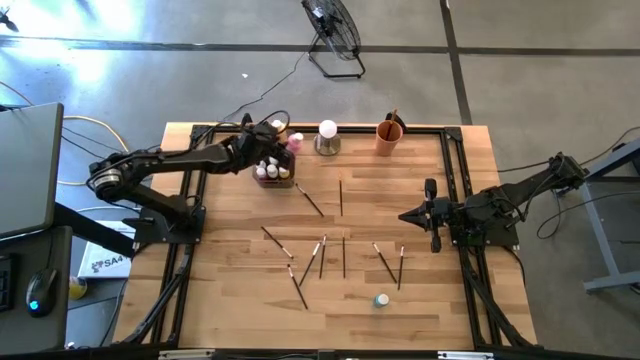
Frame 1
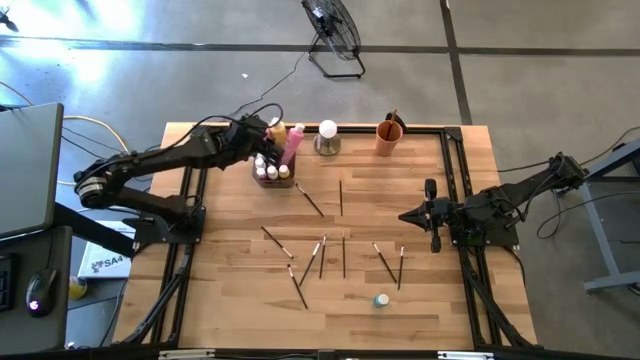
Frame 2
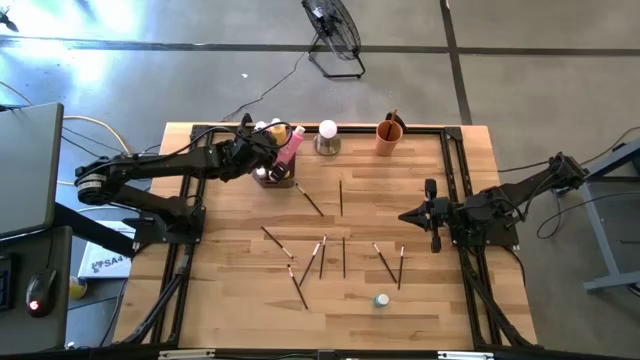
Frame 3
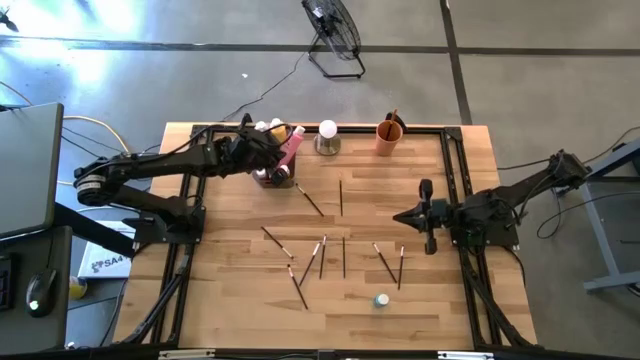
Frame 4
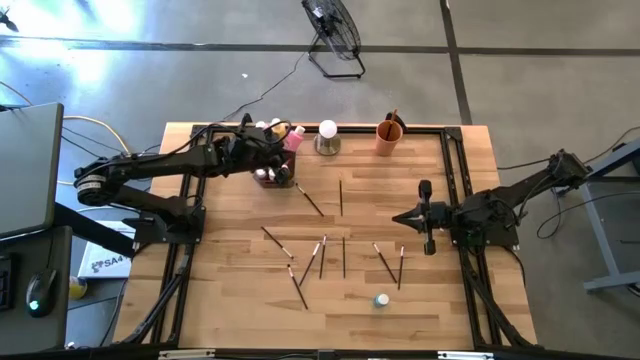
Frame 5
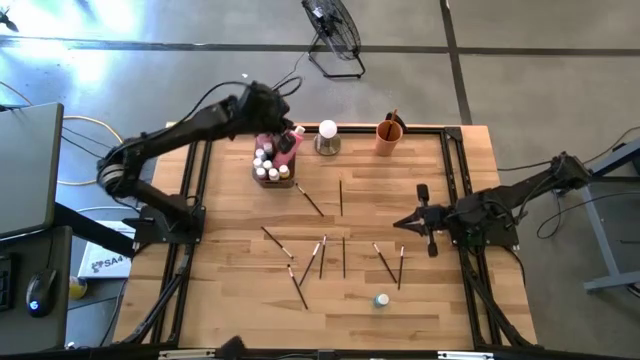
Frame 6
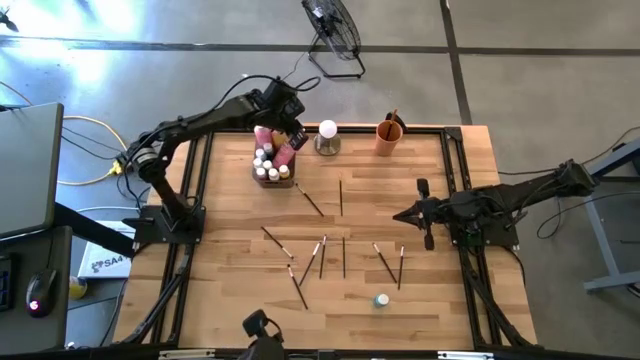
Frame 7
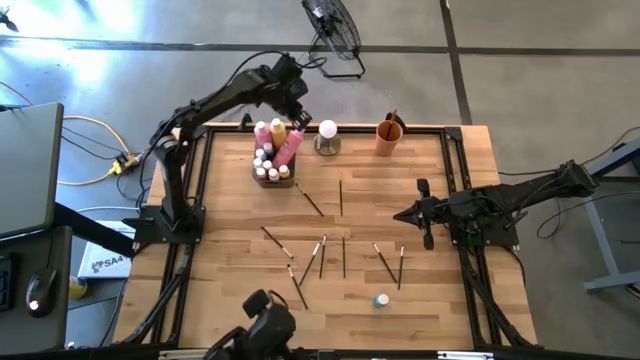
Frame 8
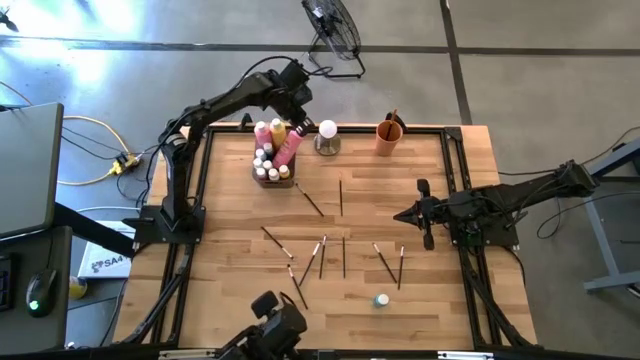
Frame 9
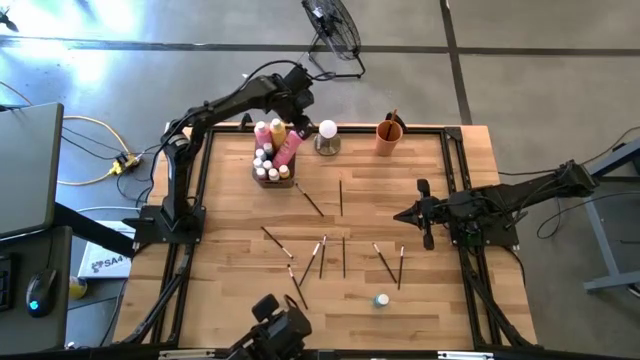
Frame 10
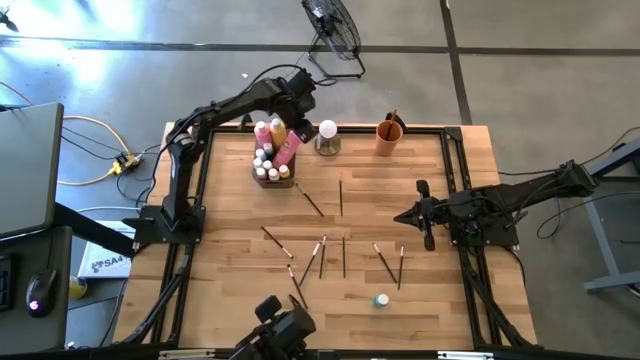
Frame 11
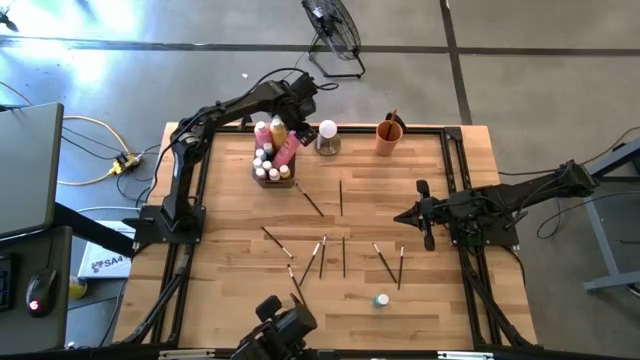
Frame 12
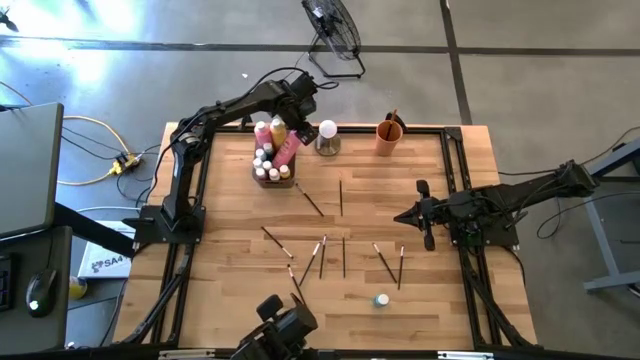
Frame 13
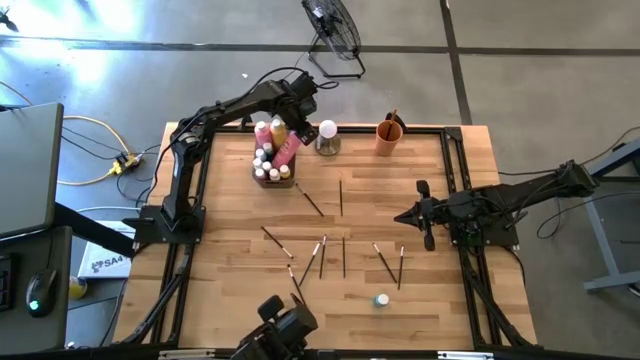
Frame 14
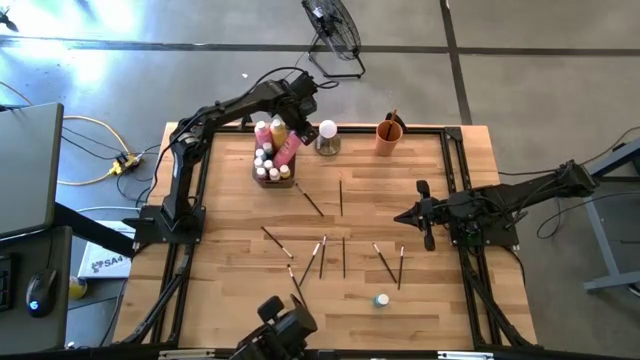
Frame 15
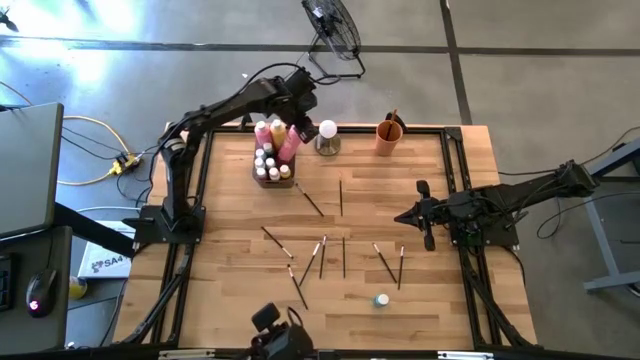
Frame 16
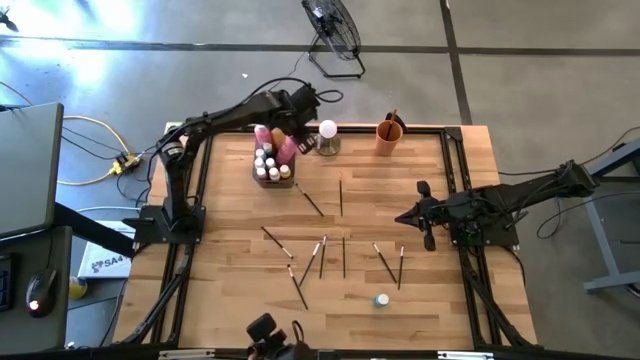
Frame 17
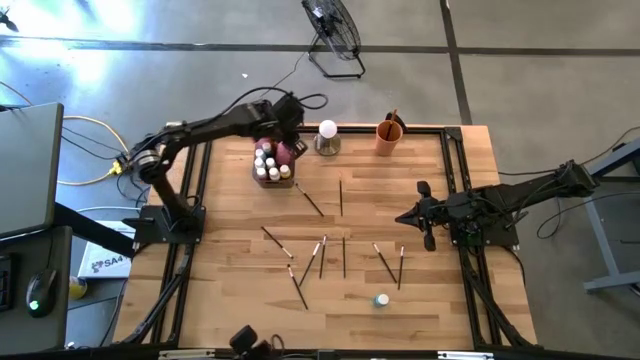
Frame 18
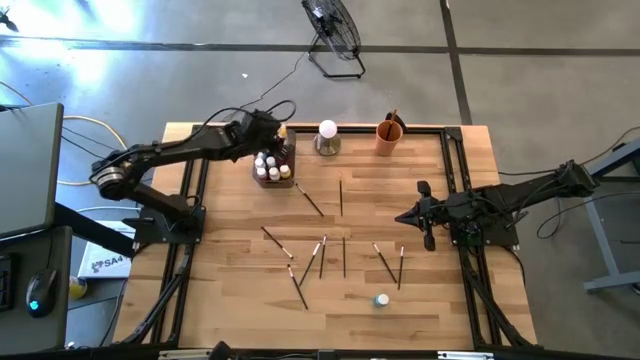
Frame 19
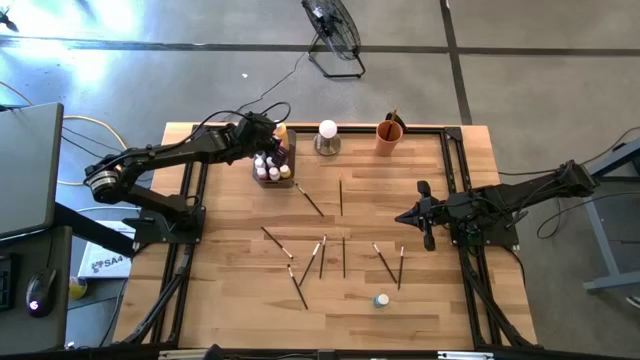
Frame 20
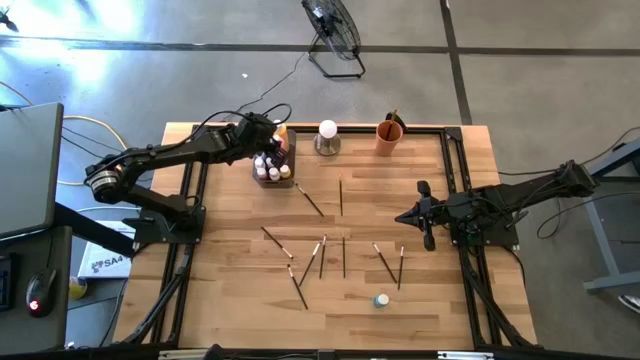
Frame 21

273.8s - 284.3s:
Task: Pick & Place Paint Supplies
Adjust the large pink paint bottle

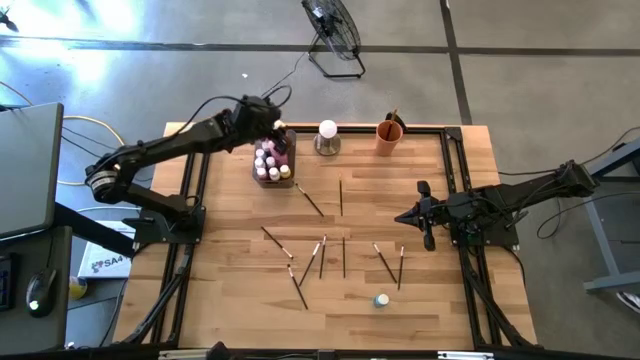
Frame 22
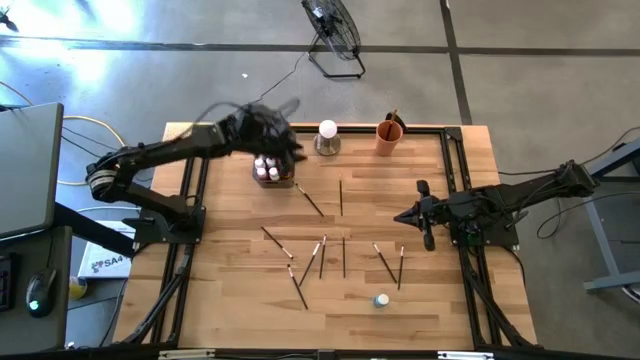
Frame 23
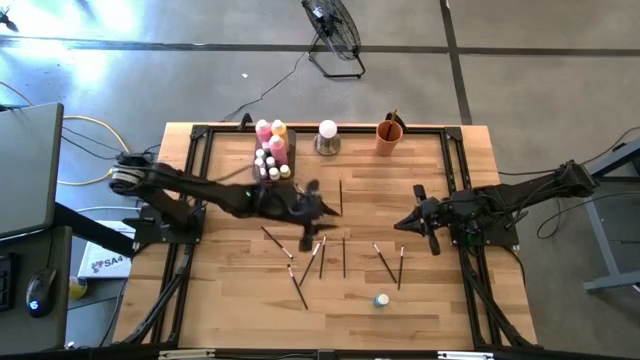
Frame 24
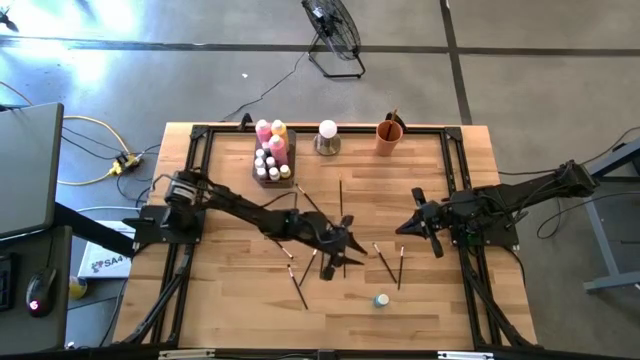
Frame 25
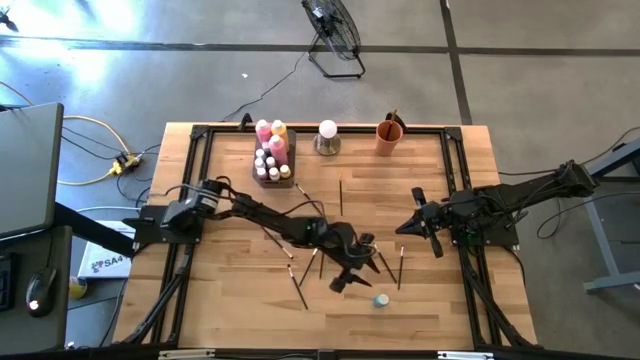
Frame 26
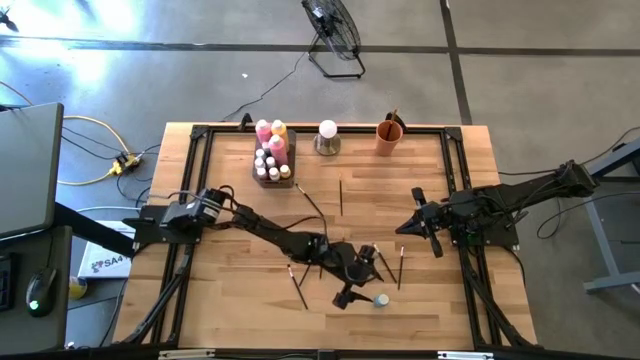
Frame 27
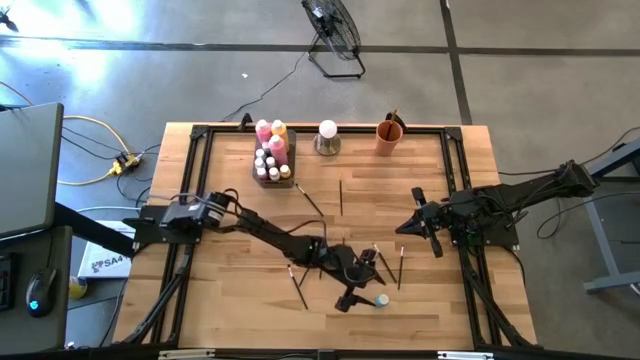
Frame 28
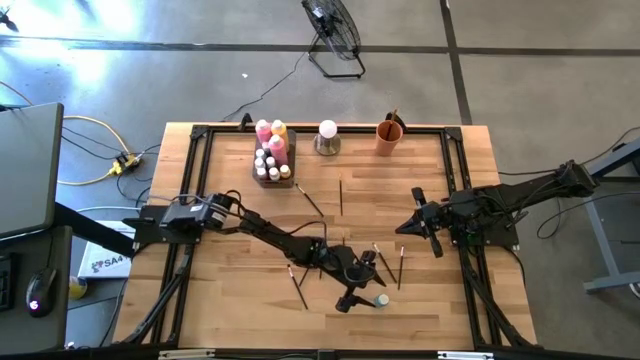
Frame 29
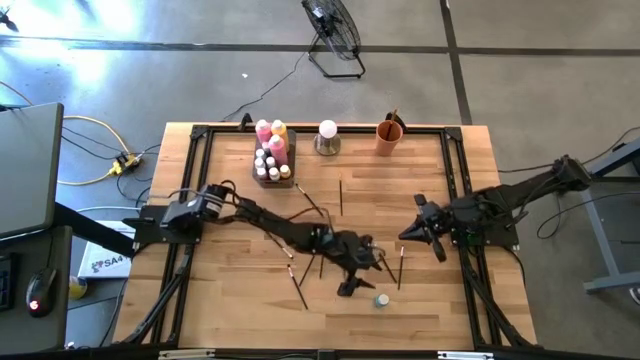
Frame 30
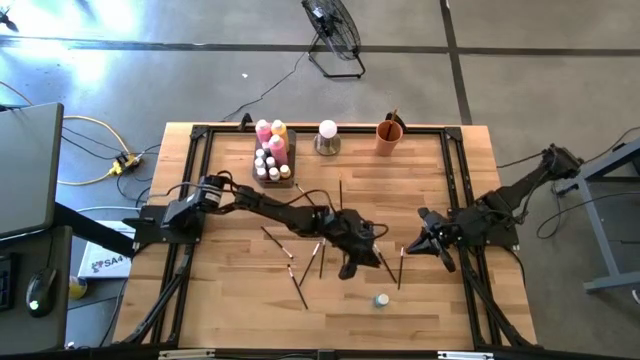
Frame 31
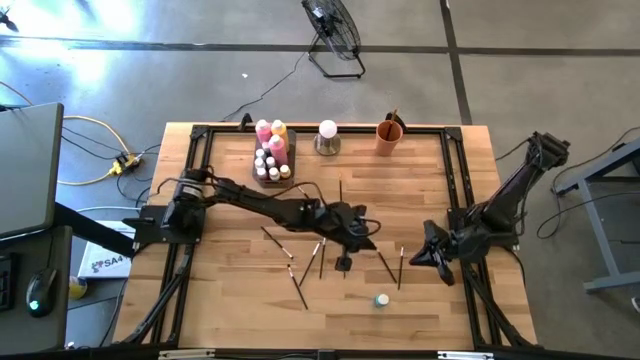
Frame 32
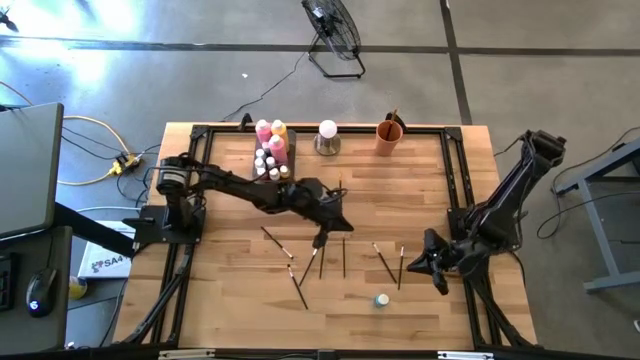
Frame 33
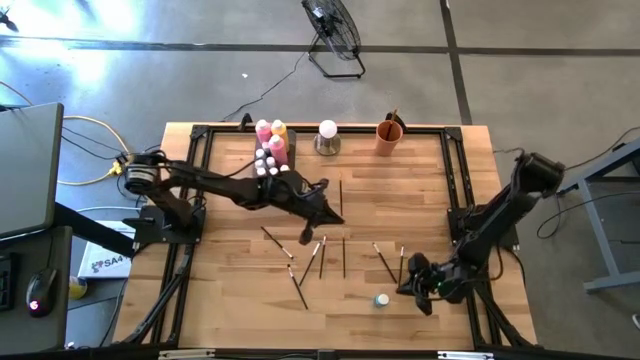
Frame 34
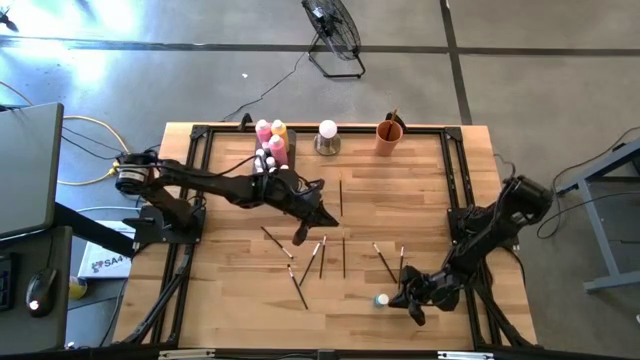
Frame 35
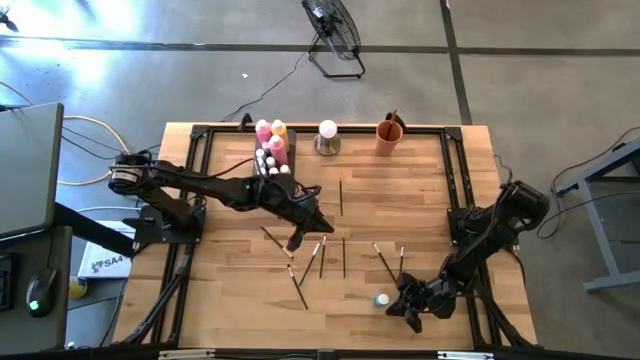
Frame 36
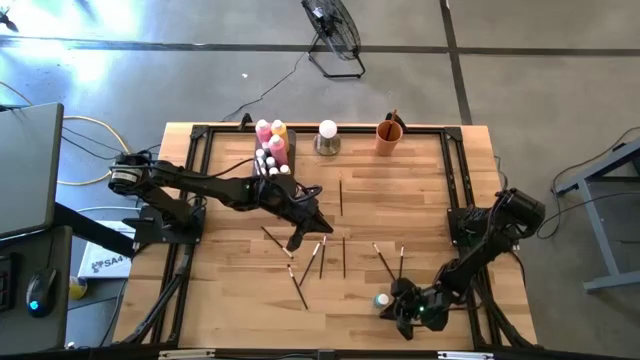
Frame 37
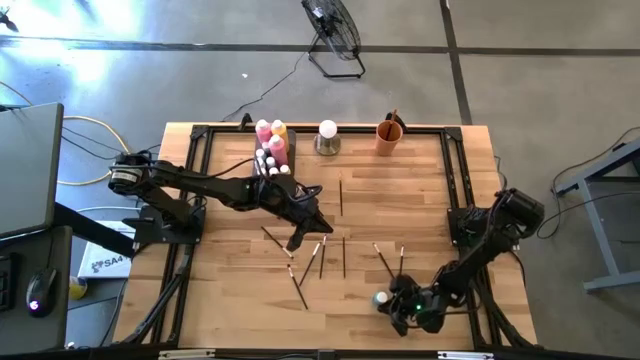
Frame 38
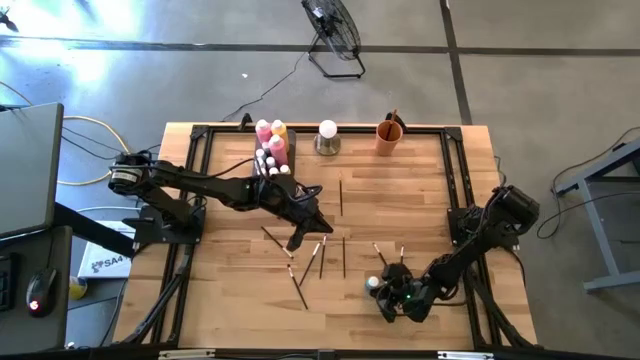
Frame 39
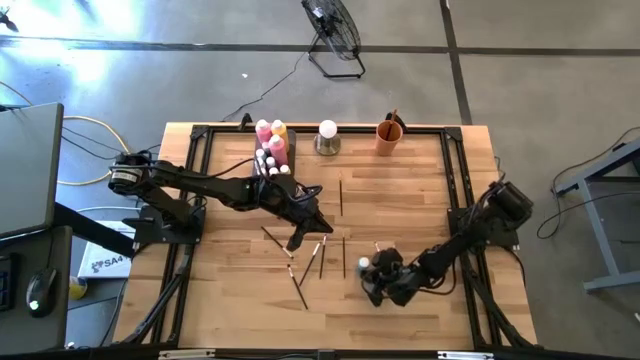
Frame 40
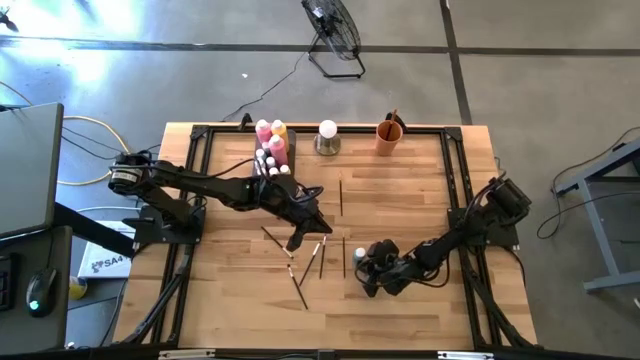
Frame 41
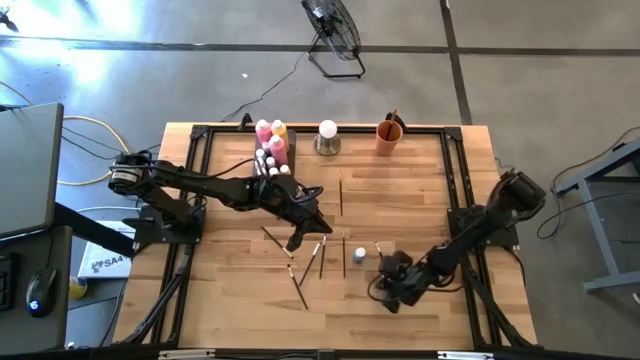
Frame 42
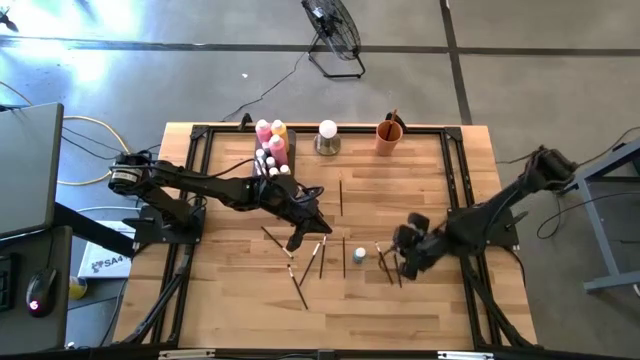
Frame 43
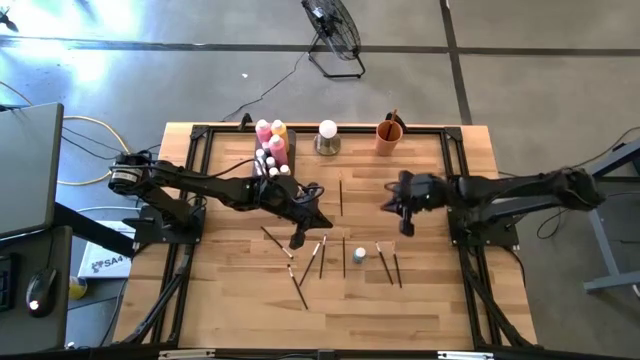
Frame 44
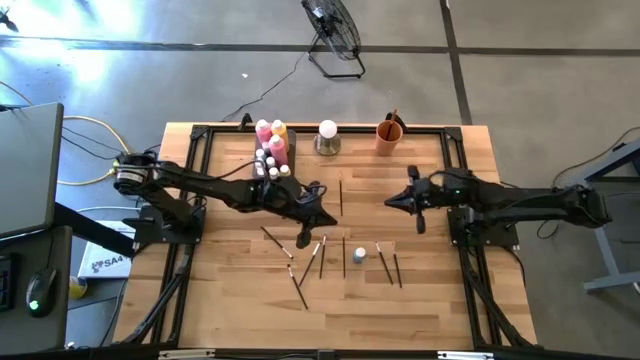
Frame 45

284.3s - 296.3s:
Put the small blue paint bottle into the gray bin
